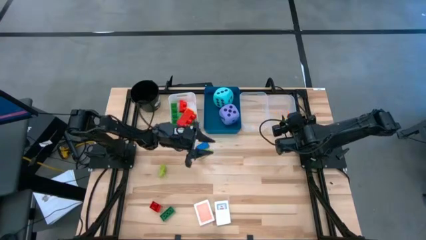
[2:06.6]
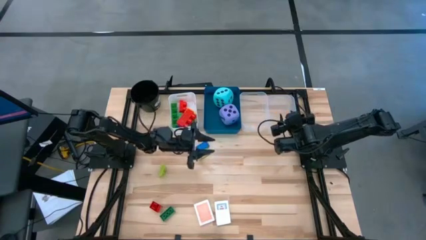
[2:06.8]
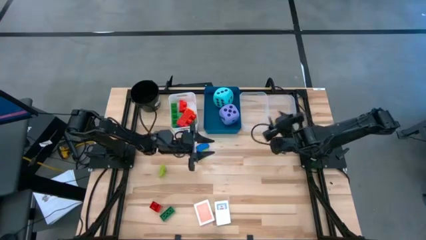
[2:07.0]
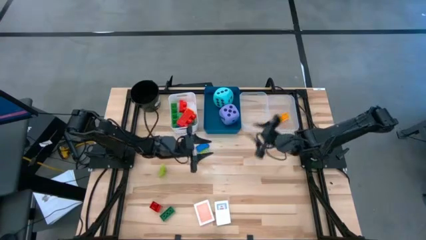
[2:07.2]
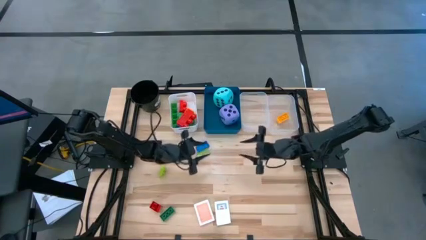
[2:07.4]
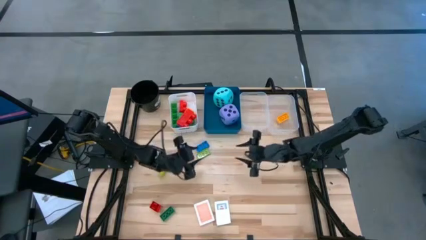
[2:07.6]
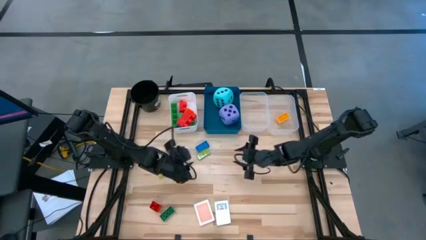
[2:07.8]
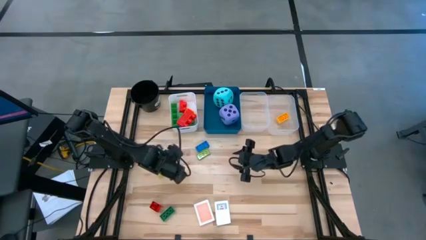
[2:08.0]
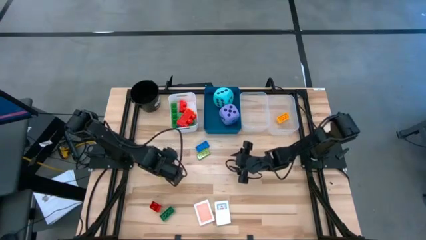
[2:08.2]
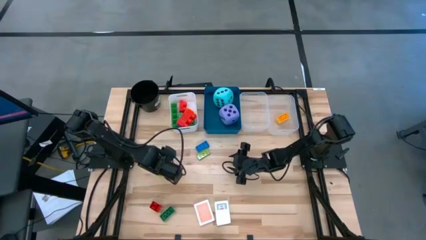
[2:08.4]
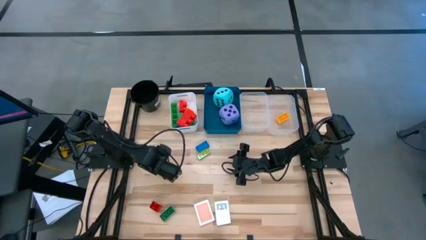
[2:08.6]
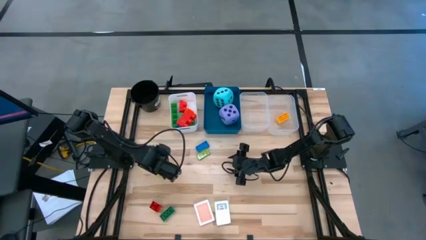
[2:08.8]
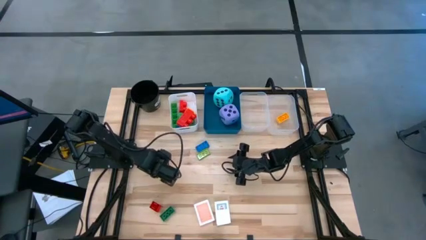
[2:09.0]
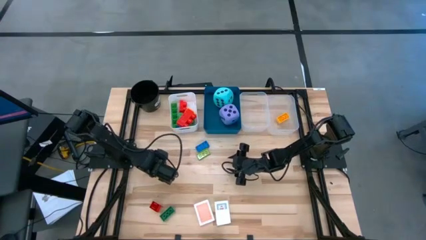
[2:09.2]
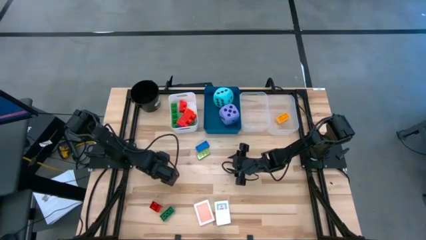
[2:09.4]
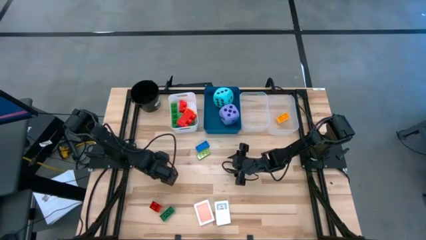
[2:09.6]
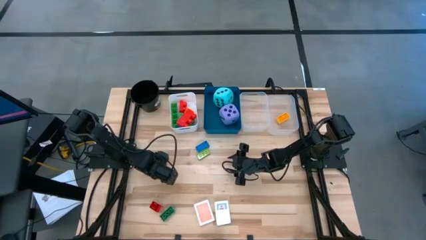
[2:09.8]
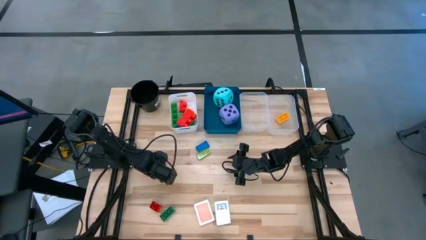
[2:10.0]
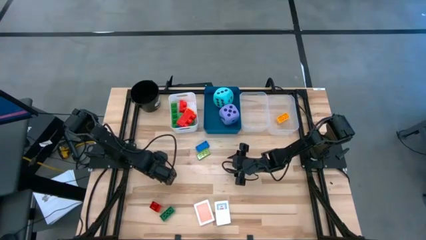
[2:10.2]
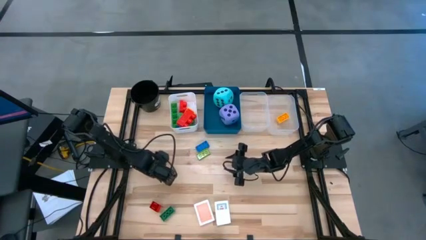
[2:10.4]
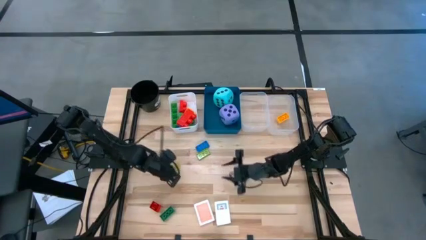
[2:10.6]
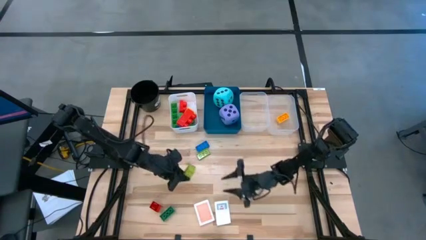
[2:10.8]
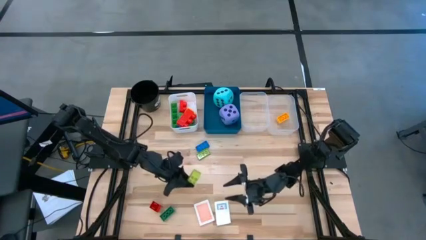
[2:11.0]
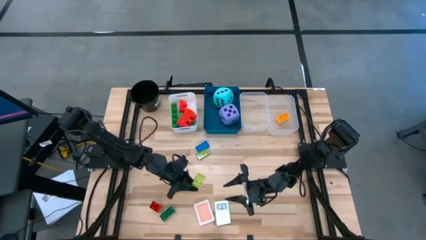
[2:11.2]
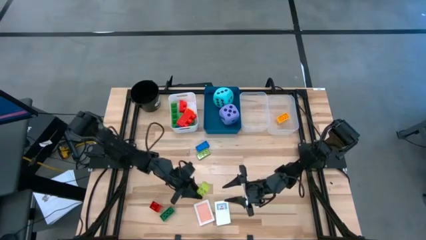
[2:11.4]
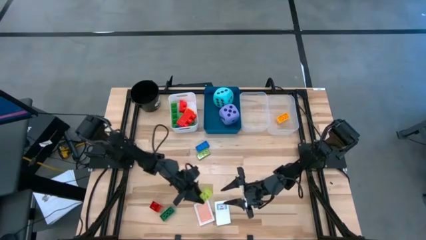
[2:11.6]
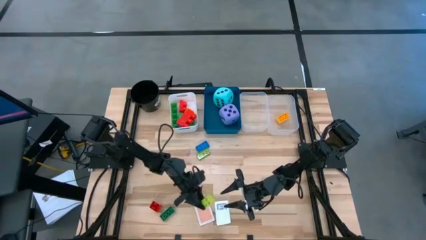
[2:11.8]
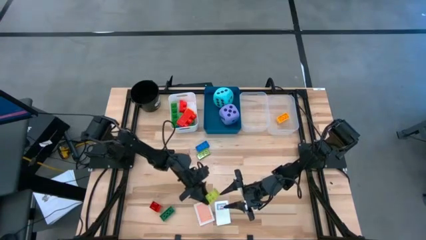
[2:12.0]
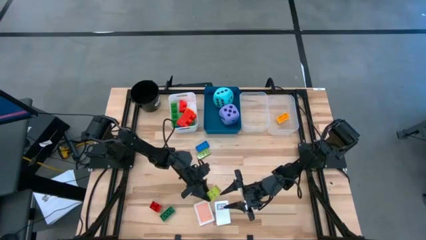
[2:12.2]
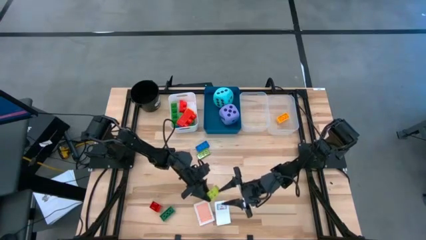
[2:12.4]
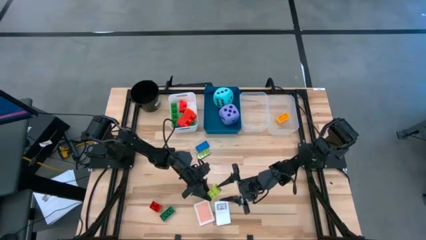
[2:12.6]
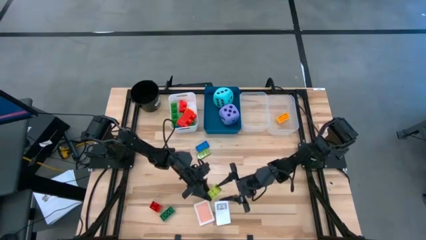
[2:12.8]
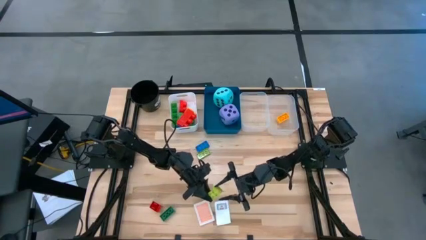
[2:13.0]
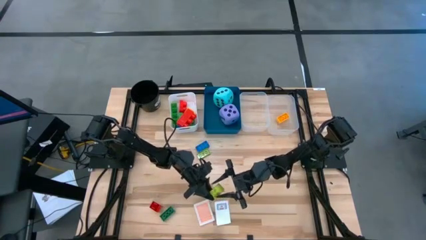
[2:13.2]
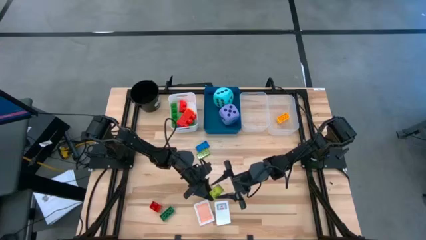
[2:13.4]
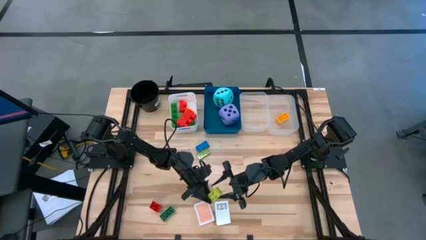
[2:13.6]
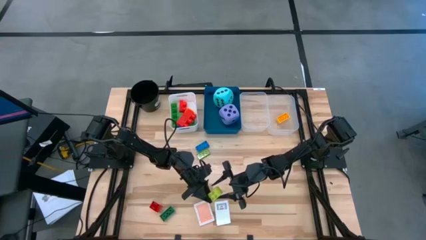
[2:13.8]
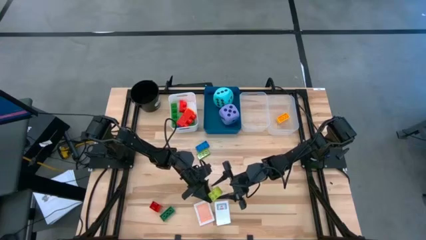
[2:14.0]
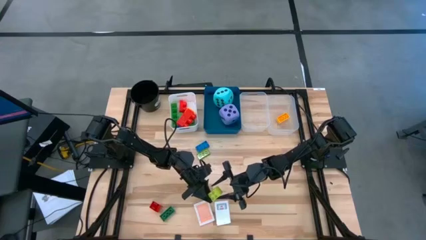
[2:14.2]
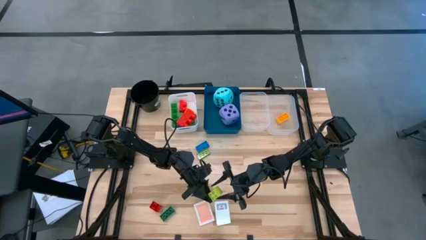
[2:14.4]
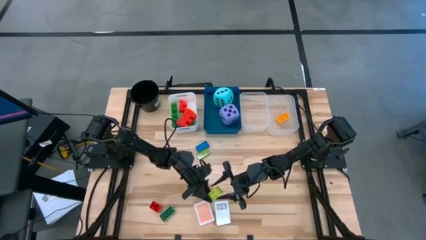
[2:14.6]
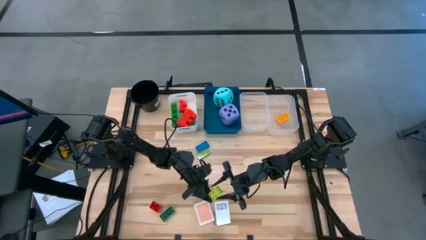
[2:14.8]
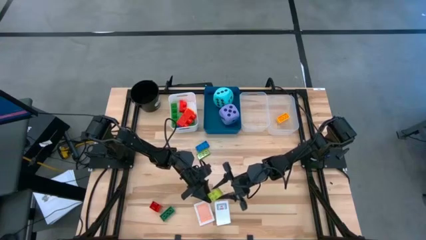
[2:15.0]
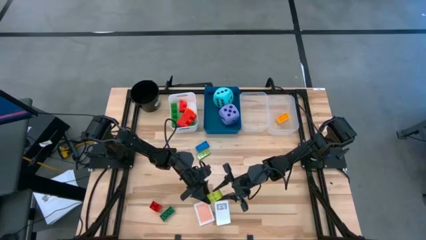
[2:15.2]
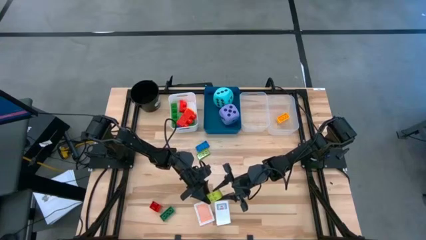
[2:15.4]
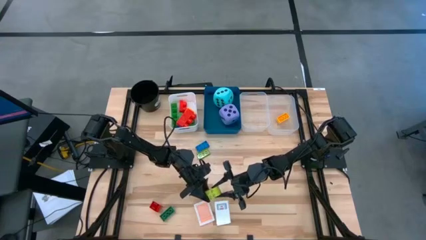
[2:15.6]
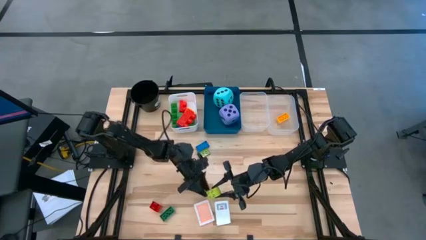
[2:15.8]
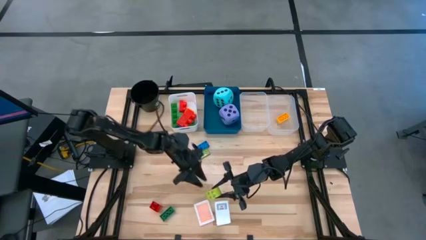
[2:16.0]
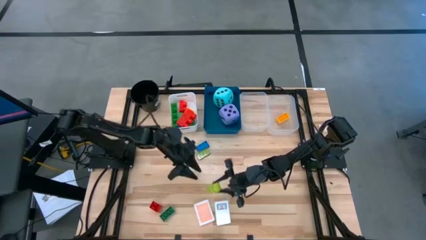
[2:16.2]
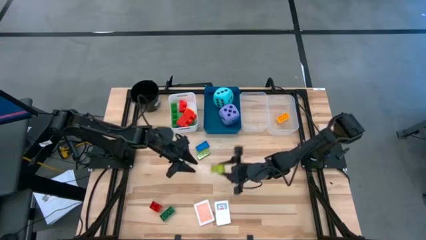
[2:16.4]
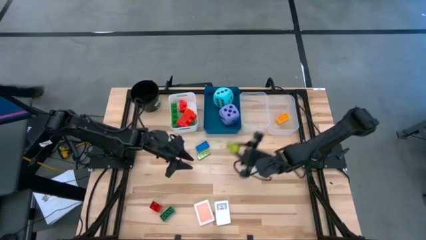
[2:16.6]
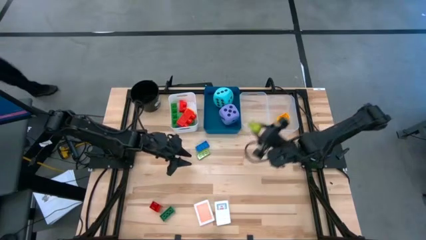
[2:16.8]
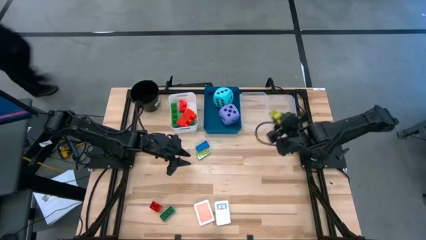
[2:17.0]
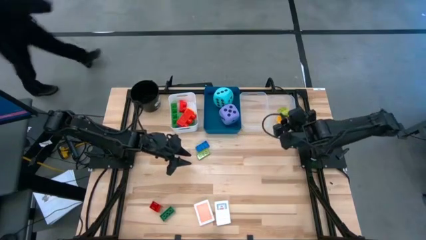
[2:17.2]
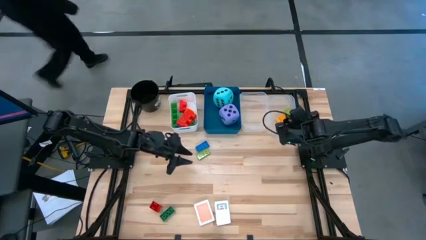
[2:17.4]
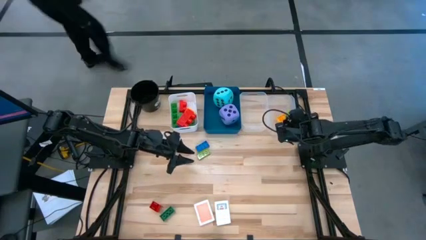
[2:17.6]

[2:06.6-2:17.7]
Task: Pick & Place Toys
Put the left small light green game piece into the right transparent bin

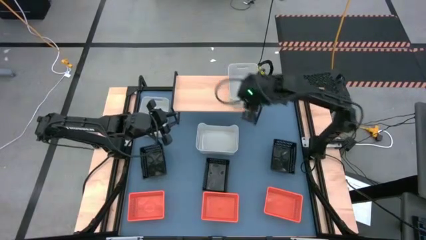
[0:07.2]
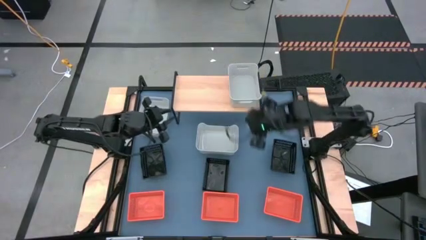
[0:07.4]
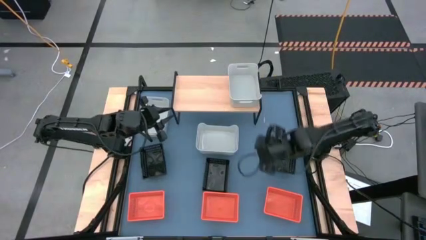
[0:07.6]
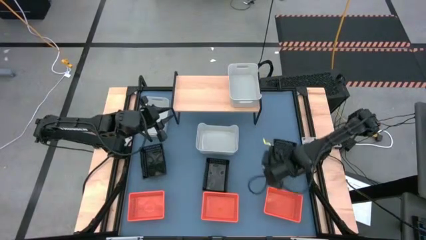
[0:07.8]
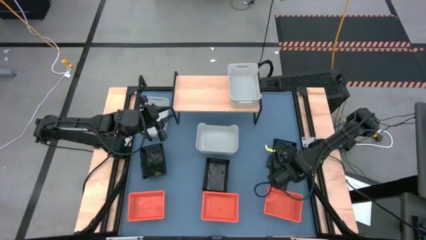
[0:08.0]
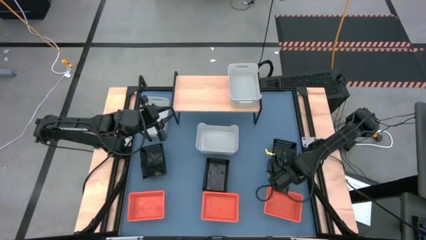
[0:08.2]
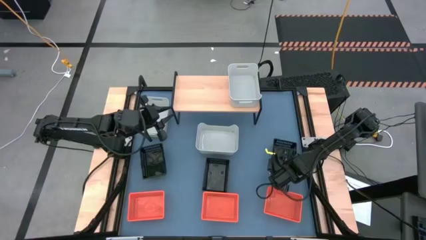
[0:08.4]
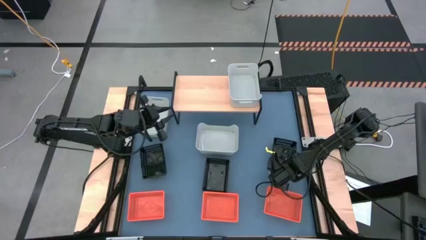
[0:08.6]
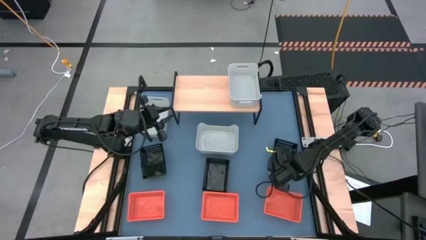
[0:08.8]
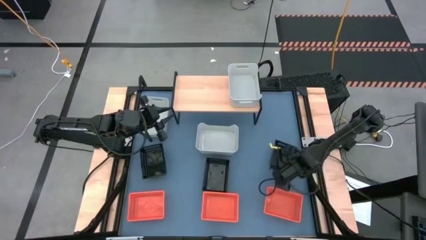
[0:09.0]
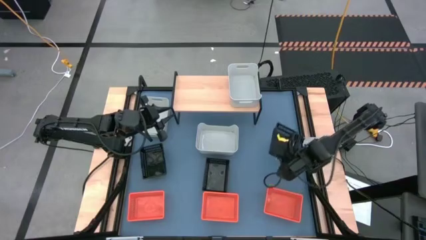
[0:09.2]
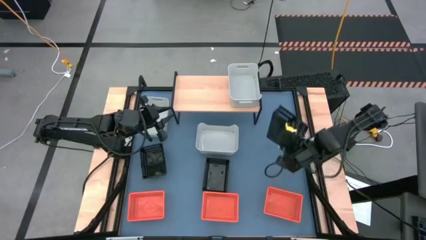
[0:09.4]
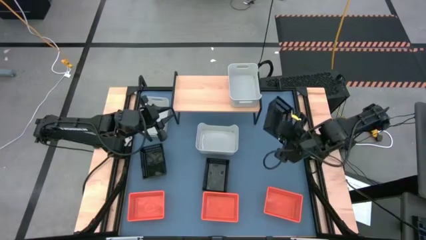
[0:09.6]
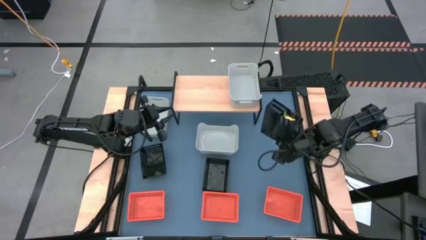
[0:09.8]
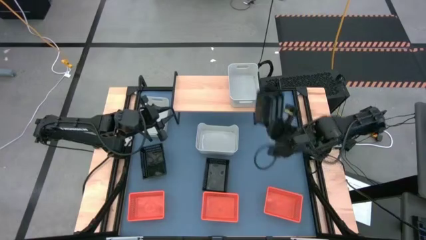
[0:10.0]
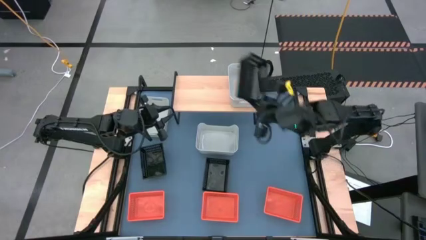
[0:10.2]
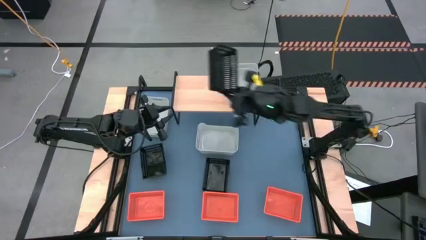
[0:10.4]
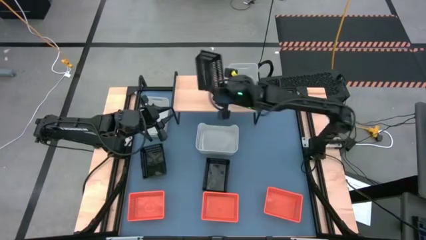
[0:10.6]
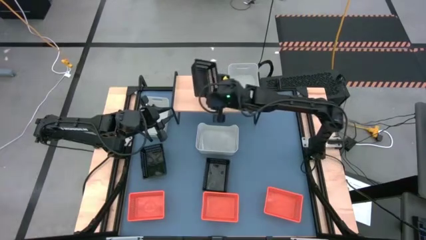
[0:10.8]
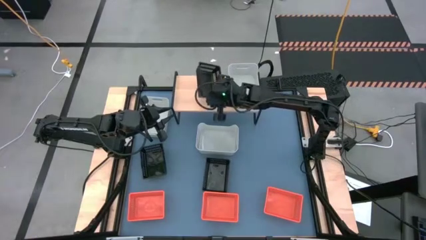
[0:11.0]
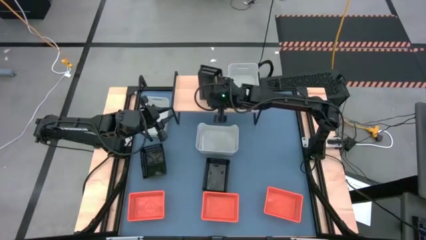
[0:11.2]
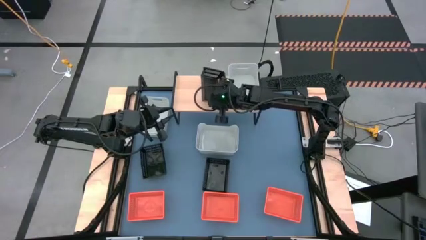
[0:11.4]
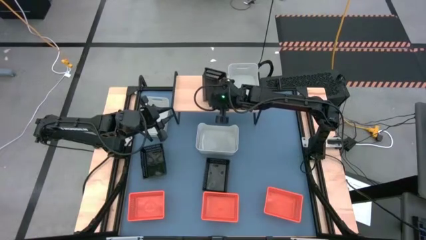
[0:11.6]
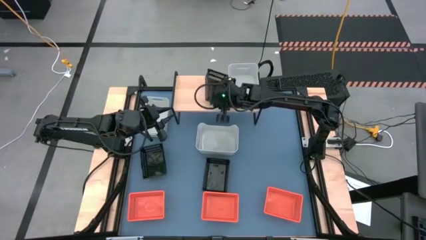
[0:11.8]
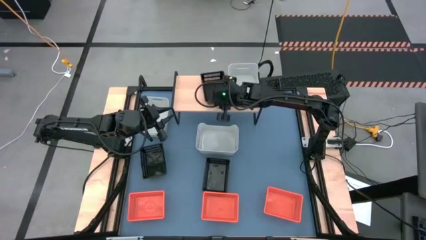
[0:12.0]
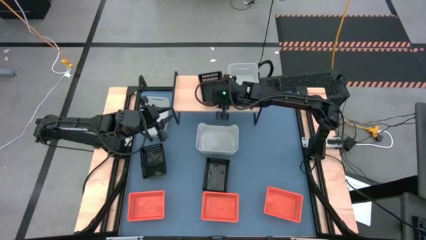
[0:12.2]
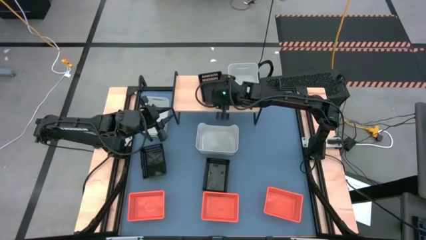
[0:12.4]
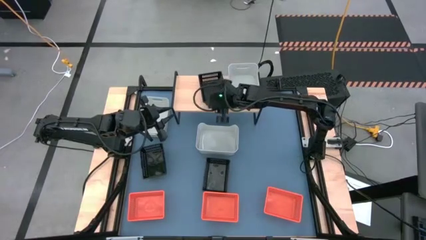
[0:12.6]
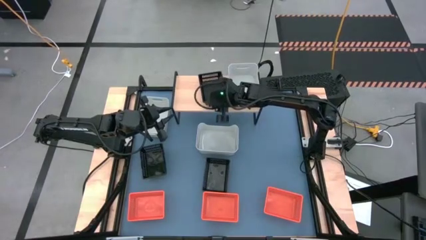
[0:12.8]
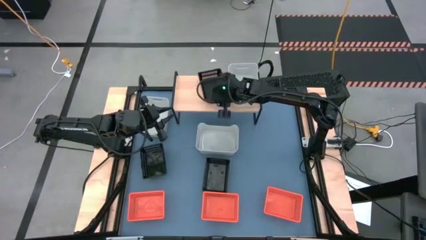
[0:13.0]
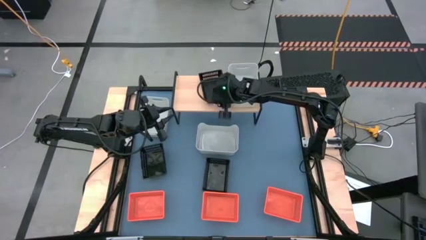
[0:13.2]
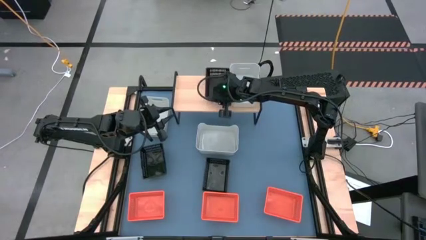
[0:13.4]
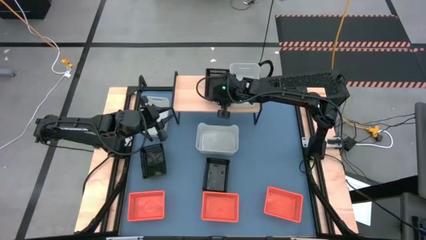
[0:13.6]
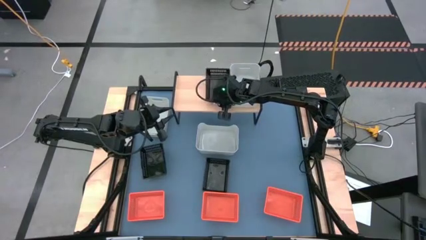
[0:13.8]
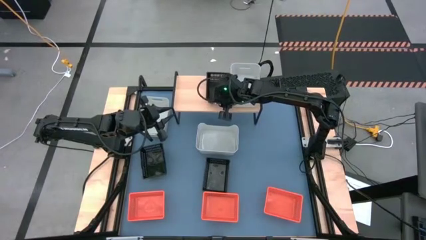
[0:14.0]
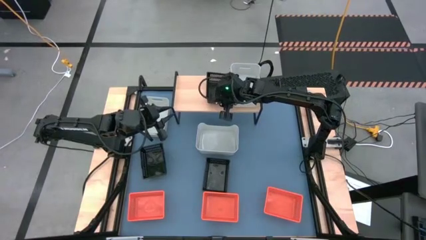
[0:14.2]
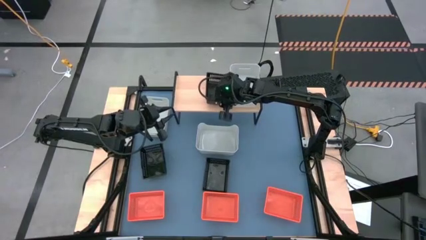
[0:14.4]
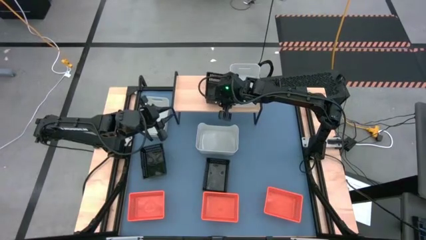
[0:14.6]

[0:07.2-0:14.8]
Task: Stack baskets on shelf by color
Put the right black bin on the shelf
